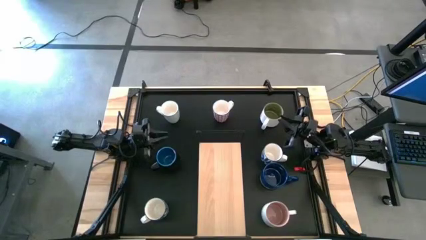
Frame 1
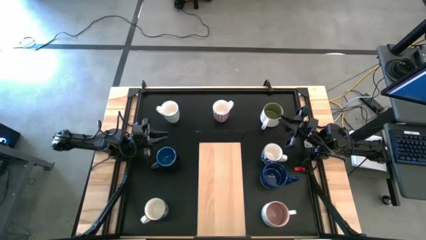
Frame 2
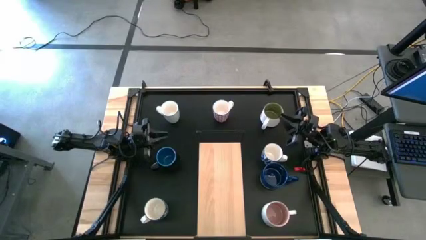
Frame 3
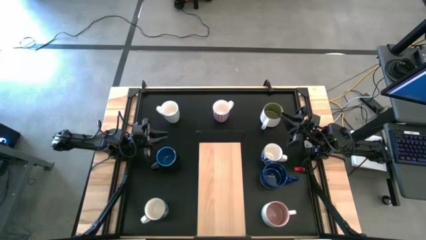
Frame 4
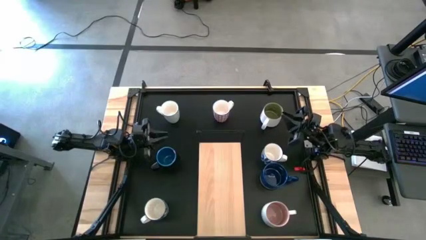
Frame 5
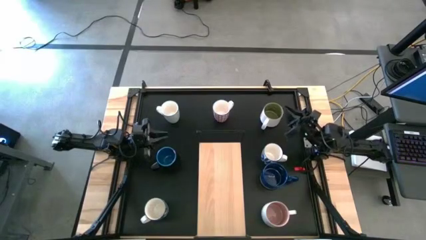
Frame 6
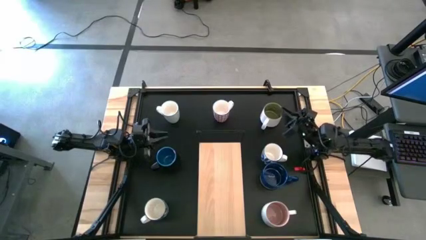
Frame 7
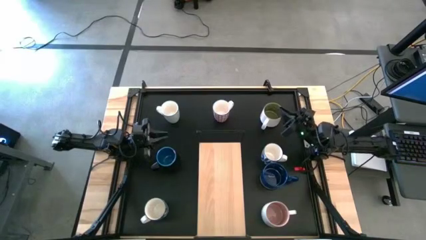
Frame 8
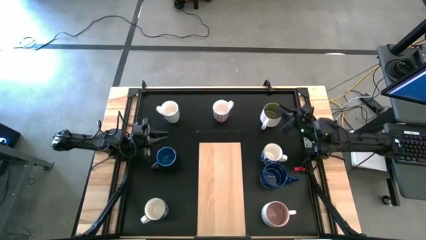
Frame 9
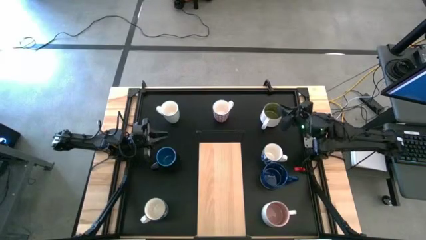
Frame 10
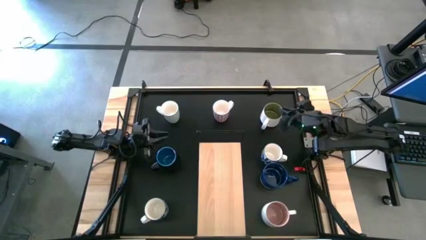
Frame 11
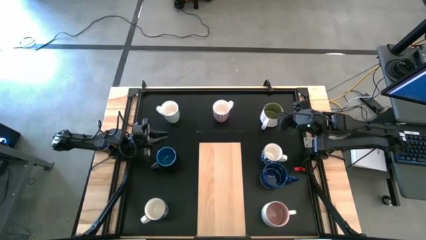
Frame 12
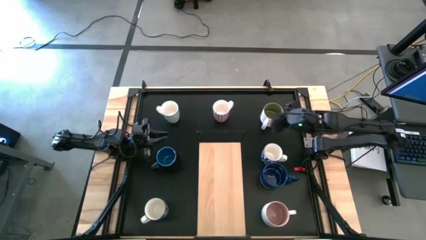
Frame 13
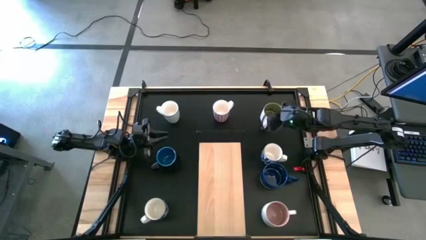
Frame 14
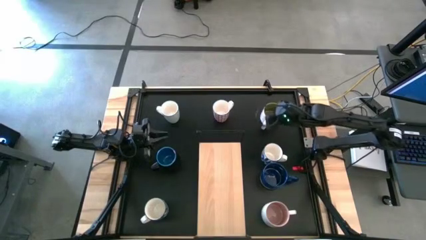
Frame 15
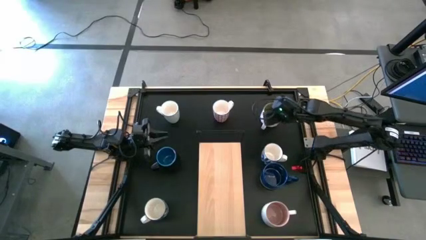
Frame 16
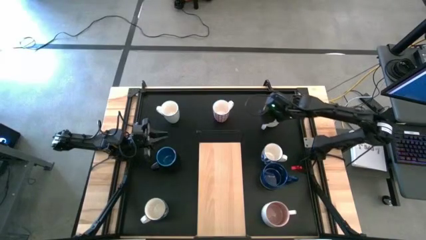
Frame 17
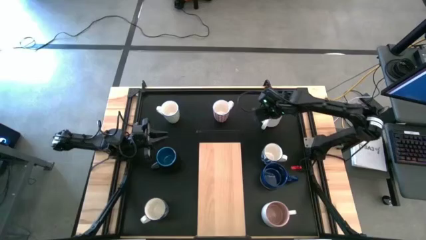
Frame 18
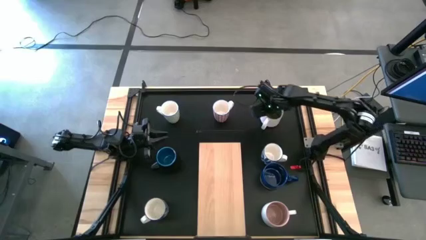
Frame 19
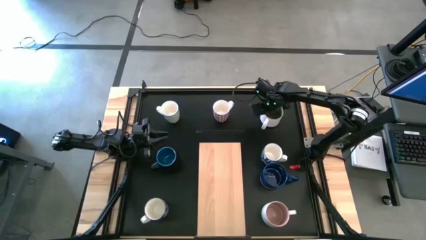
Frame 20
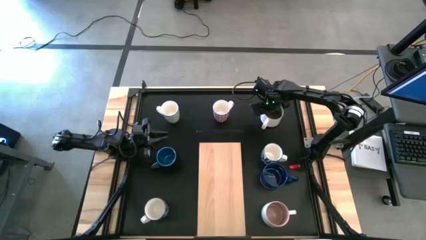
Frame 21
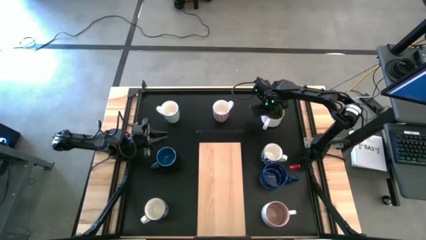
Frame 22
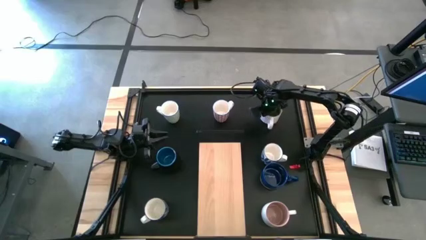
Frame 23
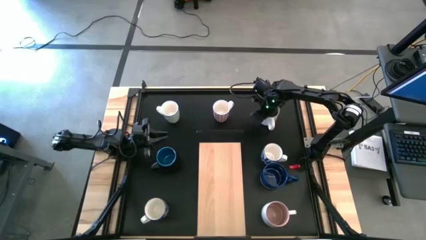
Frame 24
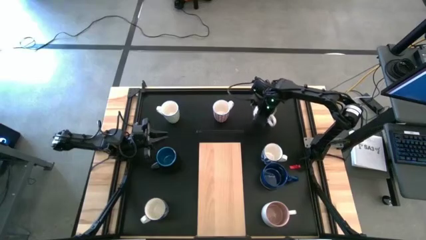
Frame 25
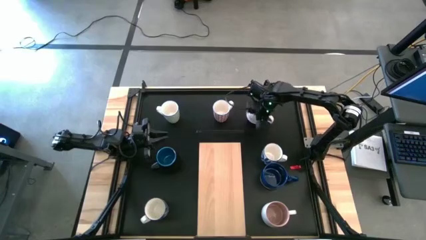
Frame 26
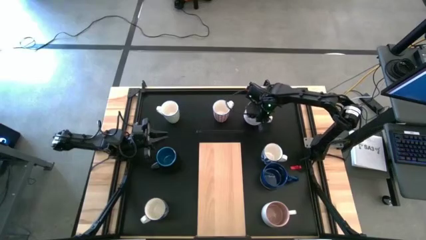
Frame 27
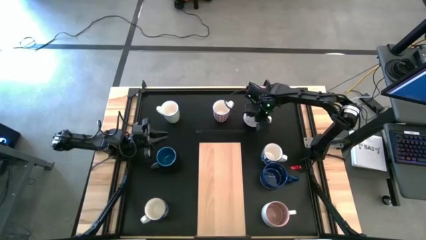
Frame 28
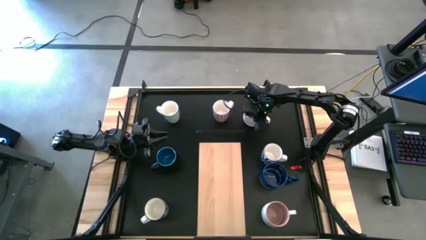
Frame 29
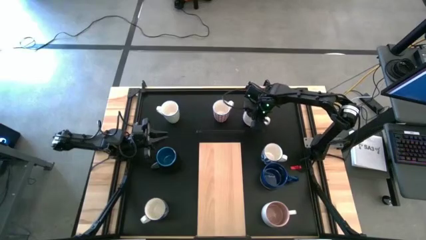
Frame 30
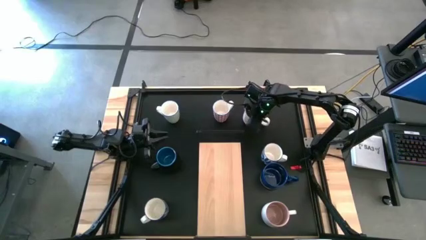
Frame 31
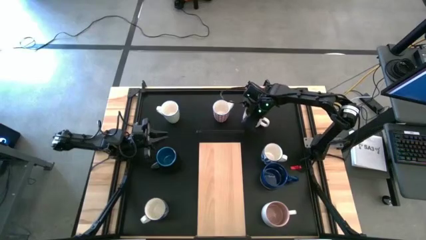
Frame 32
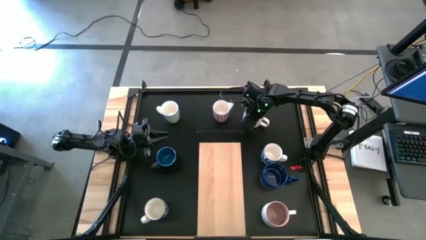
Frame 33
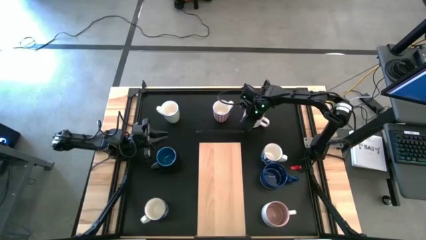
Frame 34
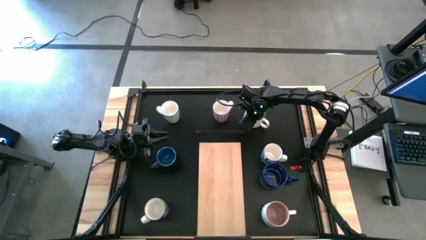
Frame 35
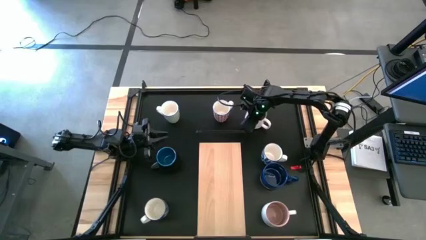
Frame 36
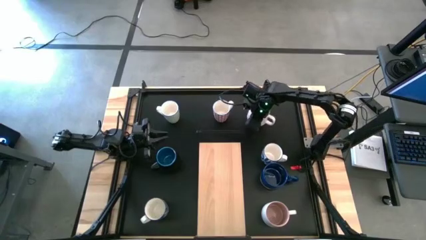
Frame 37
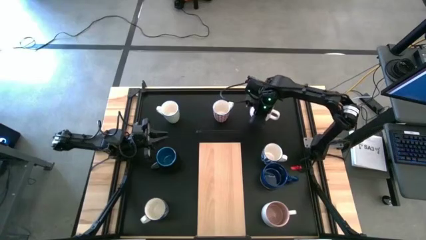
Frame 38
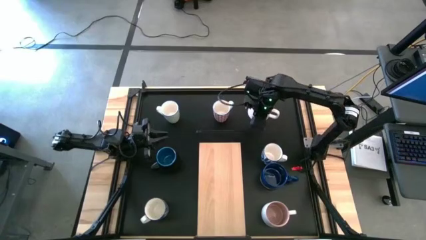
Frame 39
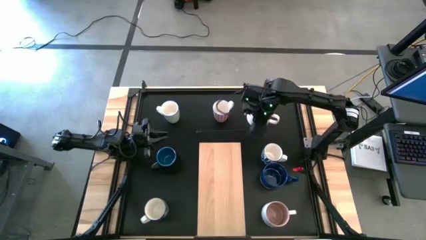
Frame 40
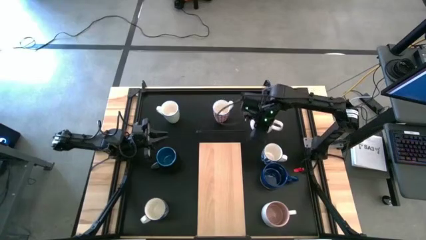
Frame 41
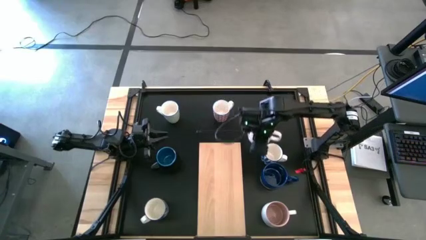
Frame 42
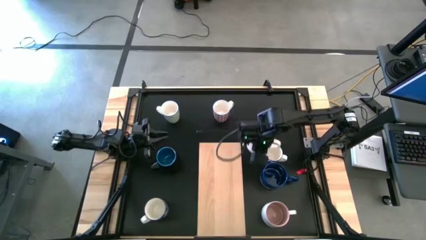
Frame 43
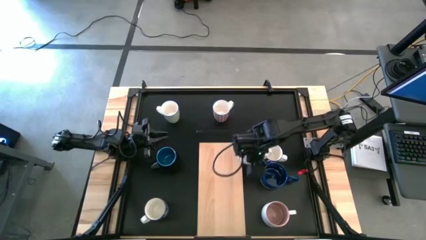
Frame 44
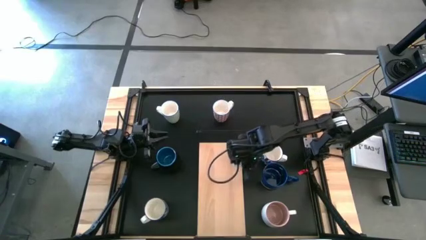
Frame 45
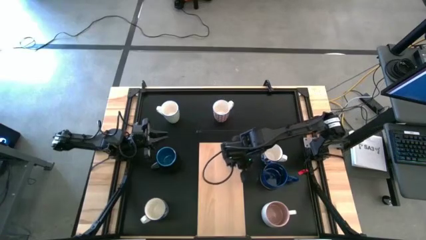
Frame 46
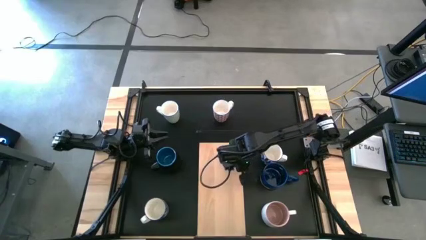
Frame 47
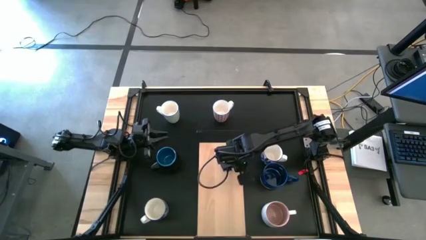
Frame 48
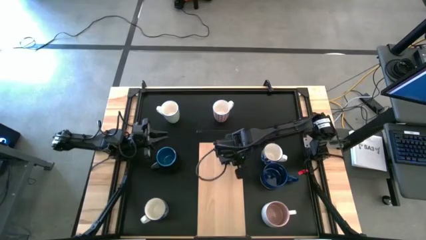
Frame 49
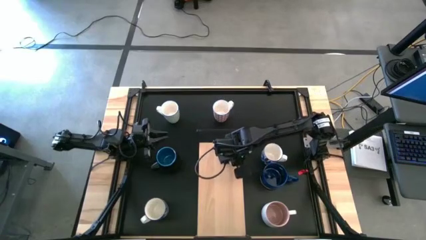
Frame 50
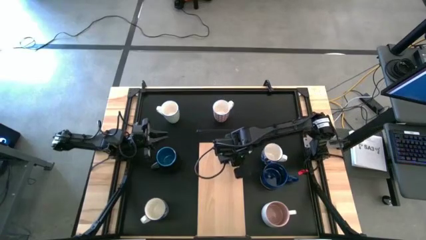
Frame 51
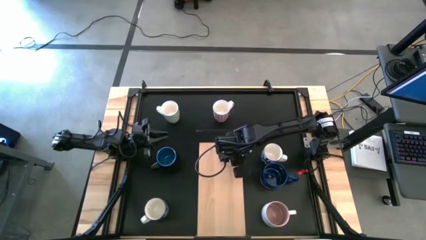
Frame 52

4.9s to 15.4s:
Task: Place coffee mugs
Put the light green mug on the shelf

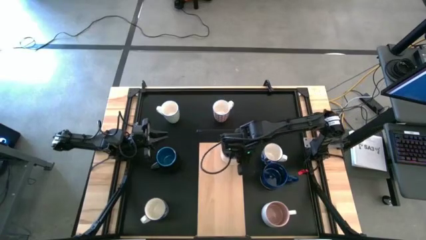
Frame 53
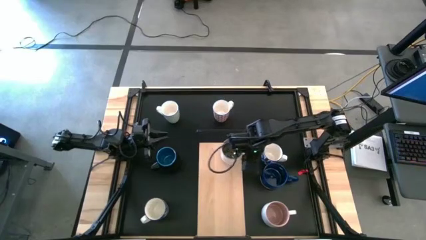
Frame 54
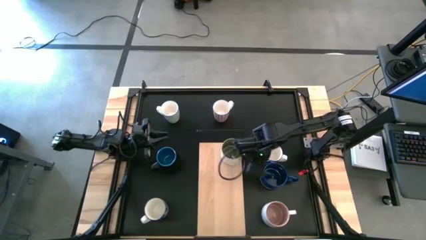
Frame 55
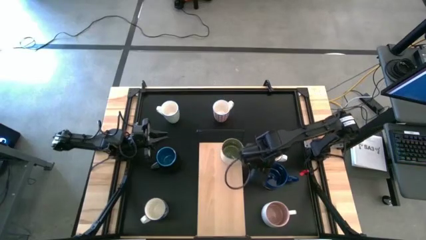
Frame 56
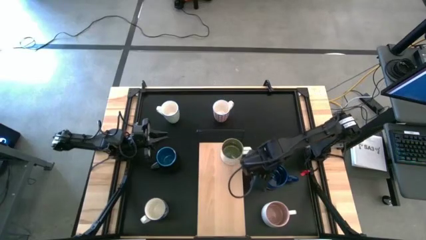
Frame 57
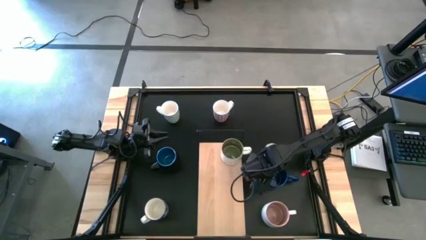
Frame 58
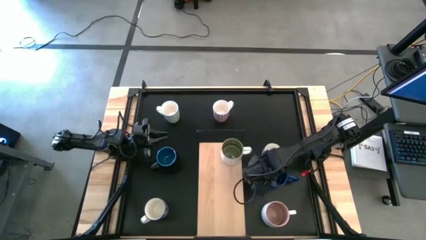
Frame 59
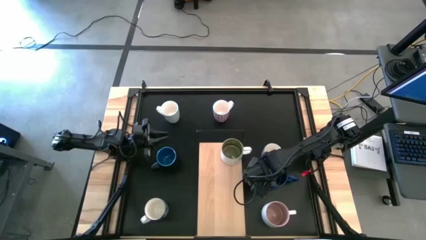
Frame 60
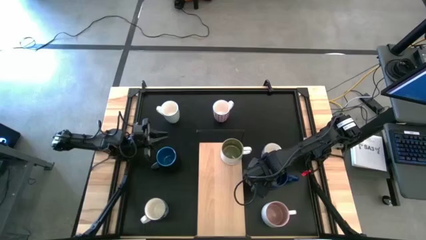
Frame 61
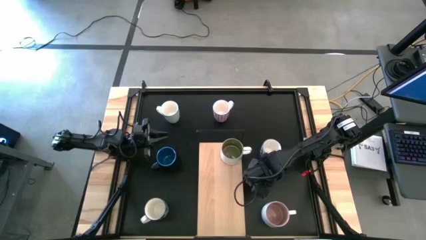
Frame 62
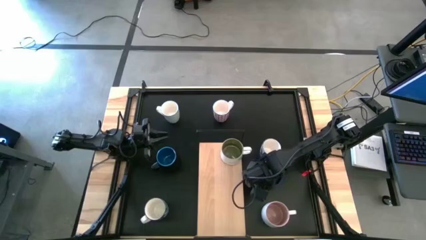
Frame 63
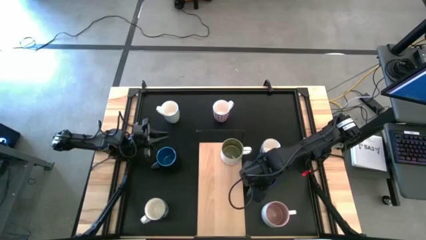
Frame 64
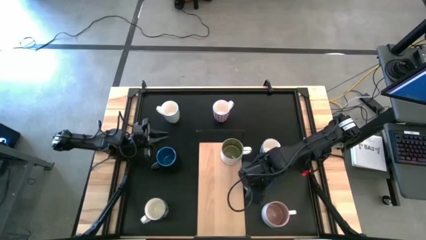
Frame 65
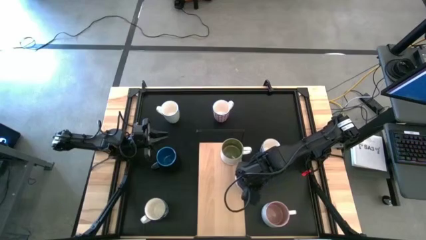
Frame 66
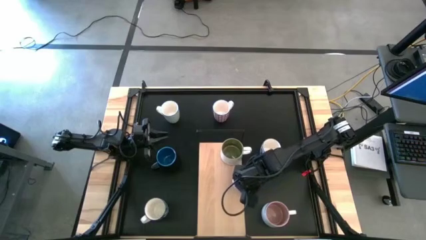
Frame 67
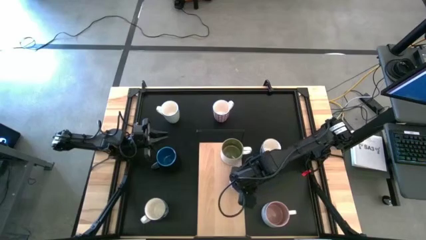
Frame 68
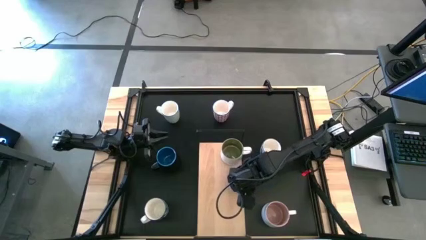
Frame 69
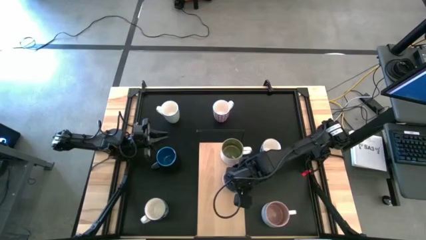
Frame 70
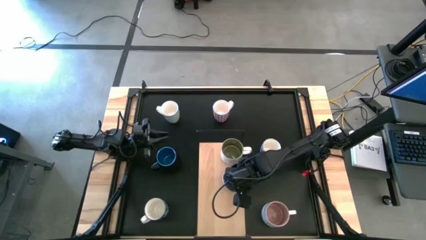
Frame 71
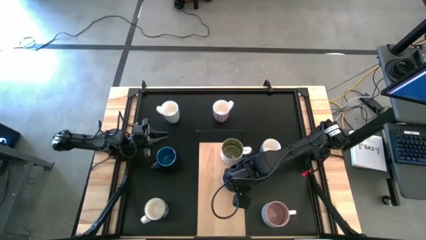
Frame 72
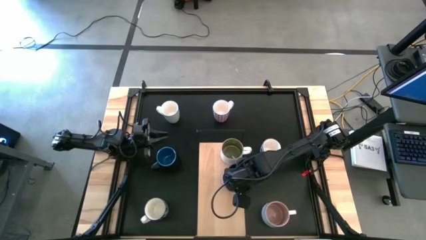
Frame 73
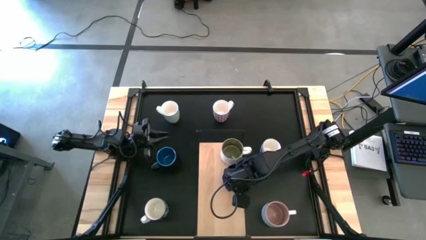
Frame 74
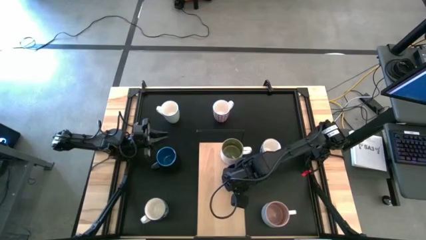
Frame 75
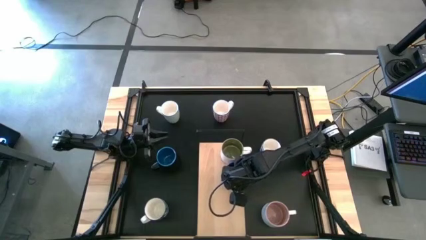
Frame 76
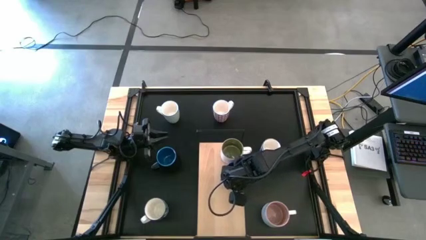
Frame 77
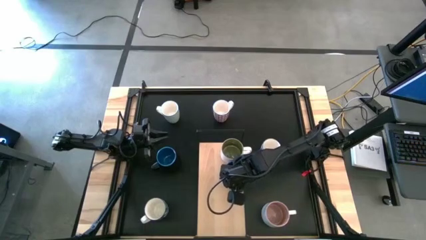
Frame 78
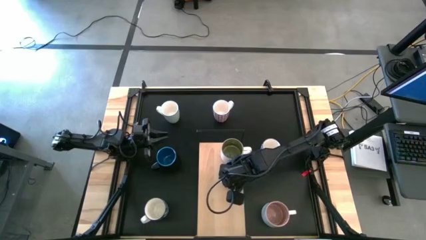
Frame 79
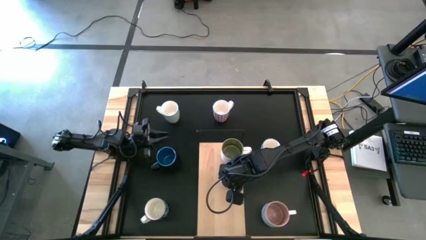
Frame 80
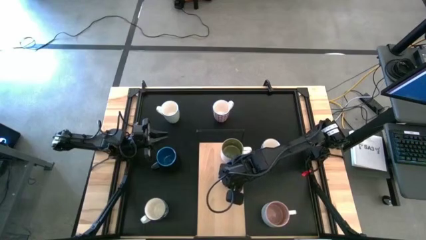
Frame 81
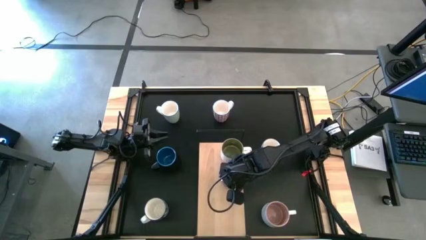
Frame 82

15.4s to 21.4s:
Put the blue mug on the shelf
